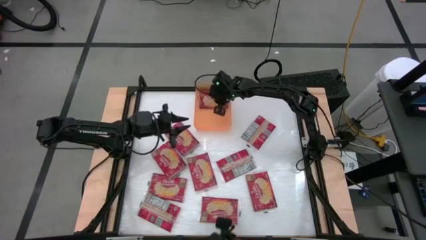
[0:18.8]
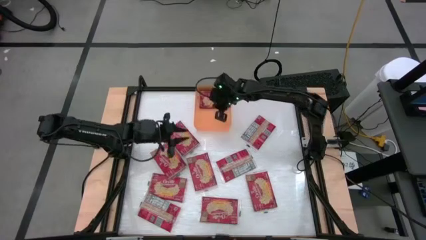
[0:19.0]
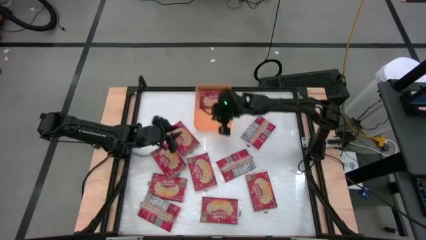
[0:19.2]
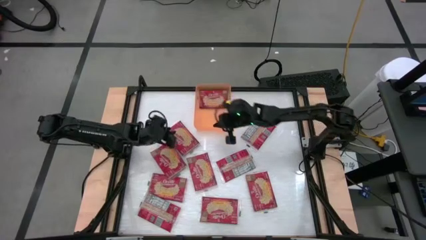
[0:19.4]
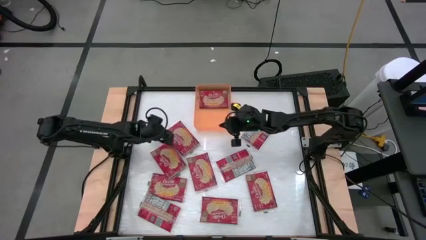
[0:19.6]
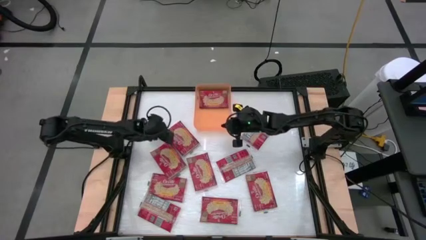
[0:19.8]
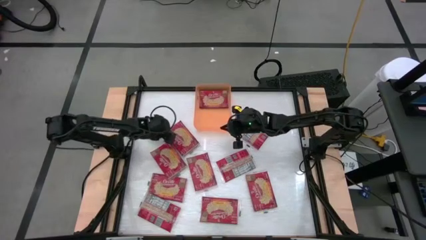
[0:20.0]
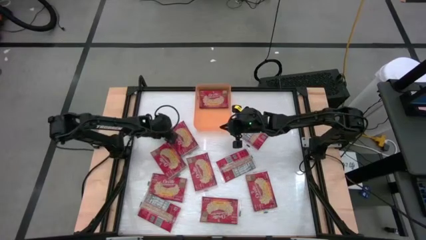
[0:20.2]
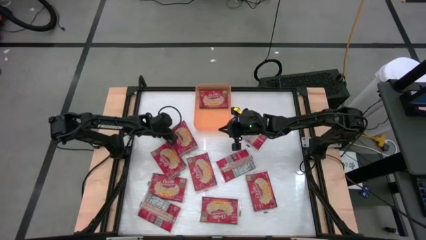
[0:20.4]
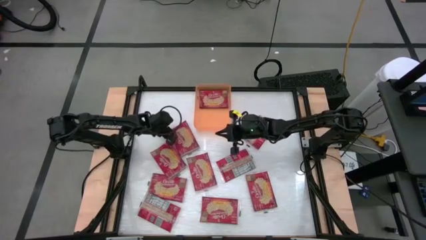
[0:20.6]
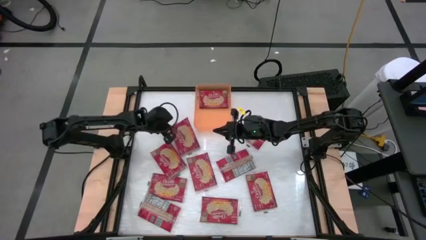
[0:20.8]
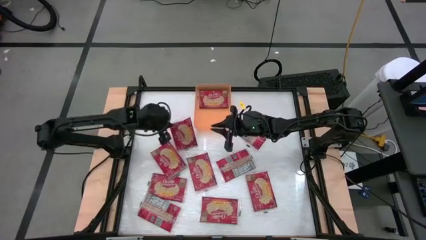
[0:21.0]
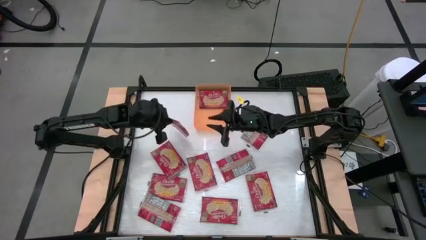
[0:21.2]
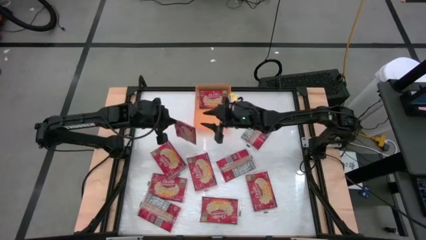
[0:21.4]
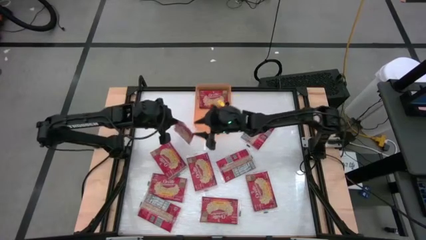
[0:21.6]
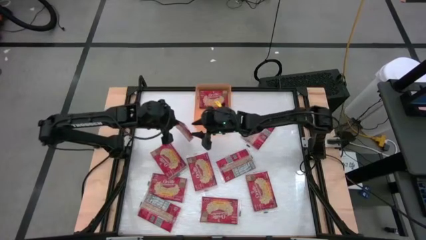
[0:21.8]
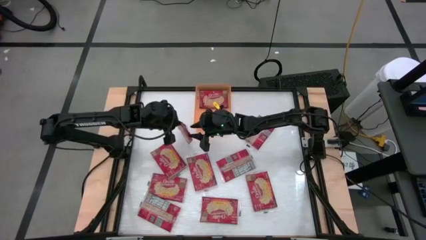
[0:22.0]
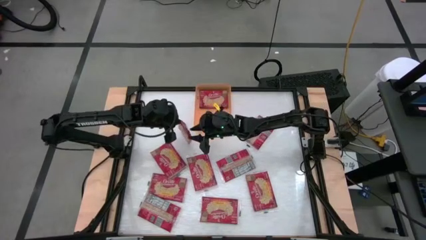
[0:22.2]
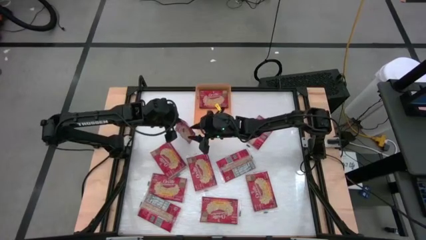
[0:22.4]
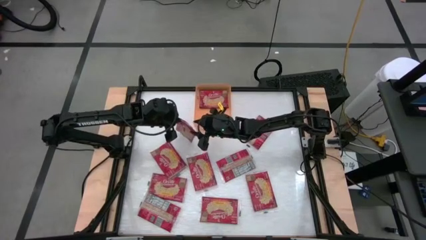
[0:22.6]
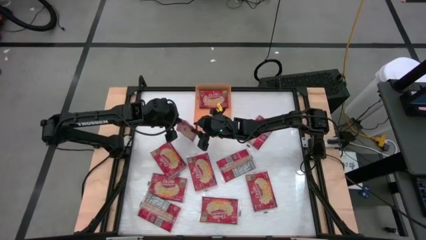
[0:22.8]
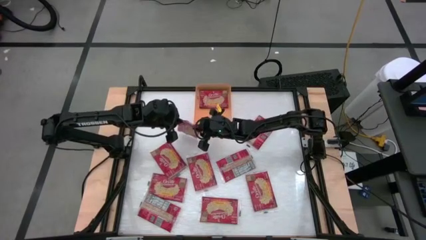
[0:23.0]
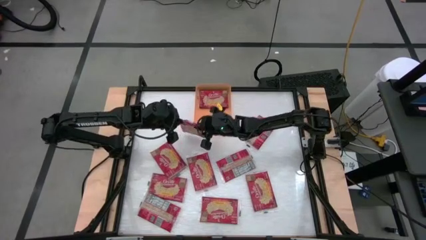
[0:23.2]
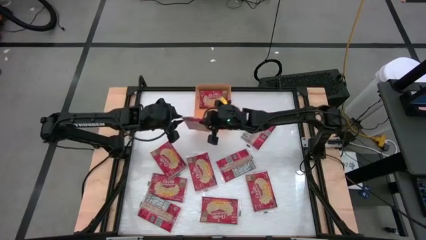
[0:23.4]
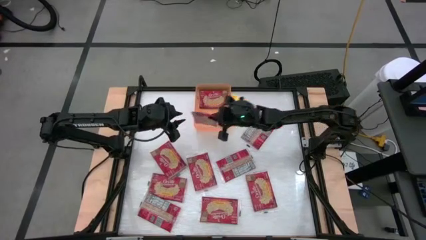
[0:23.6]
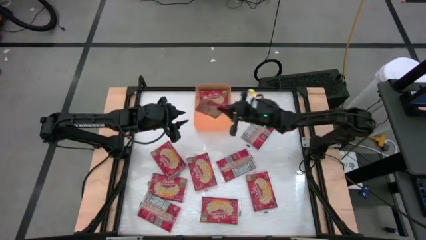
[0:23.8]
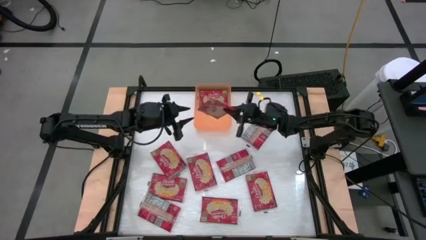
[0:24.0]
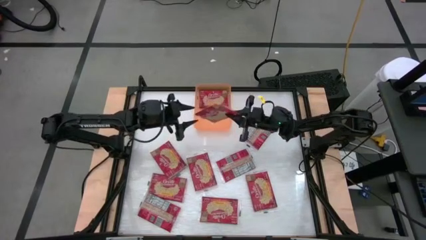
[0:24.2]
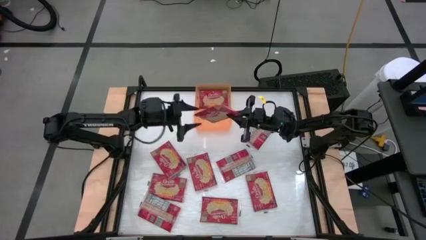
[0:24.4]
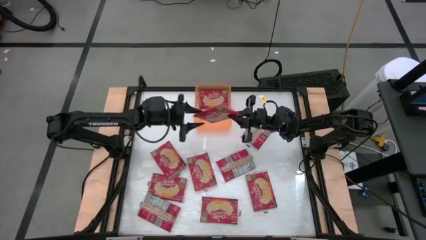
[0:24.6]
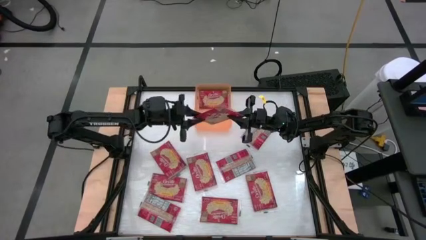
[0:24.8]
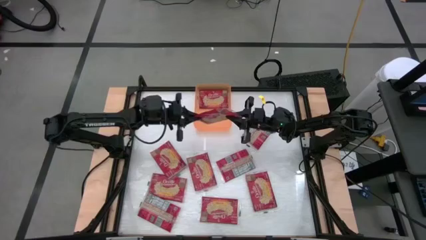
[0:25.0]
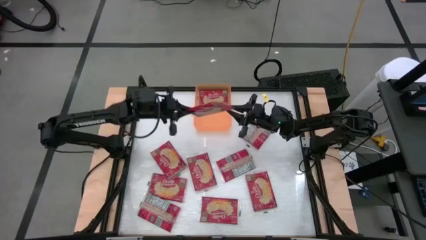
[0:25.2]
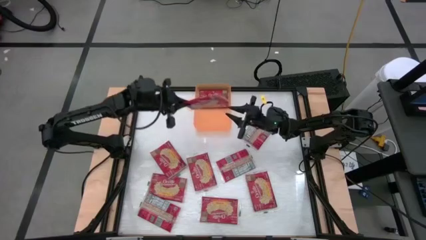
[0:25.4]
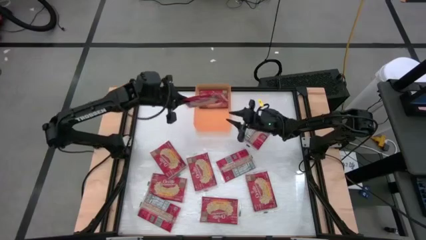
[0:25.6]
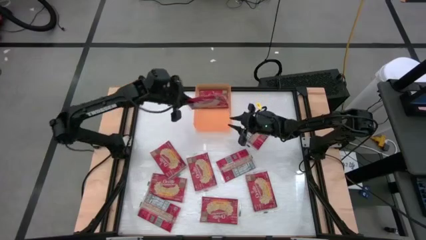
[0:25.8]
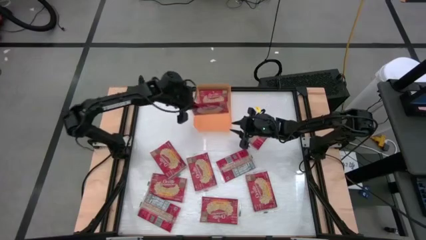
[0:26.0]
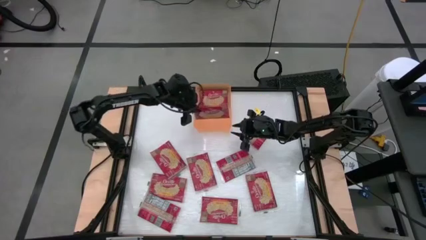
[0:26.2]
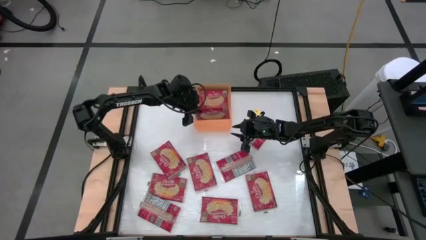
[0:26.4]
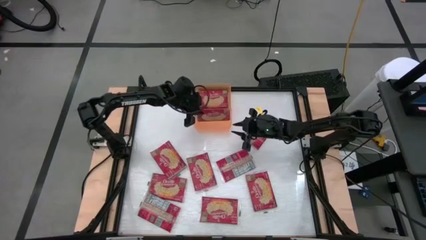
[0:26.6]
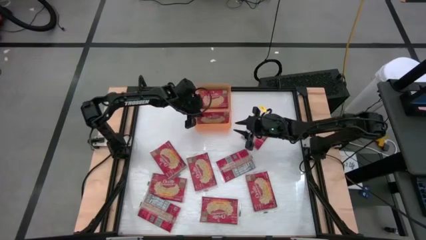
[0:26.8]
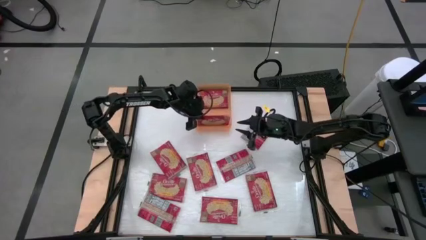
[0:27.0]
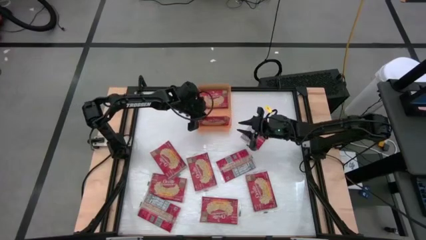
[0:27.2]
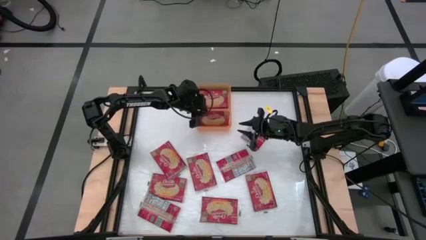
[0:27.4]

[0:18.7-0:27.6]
Task: Sort popcorn bags into baskets
Put the red popcorn bag into the orange bin

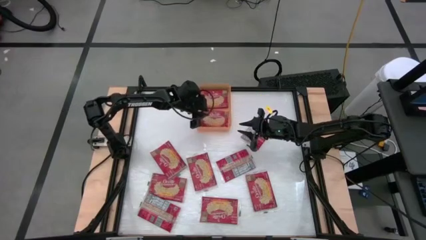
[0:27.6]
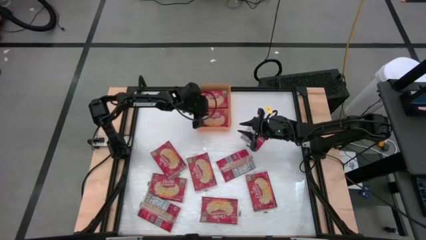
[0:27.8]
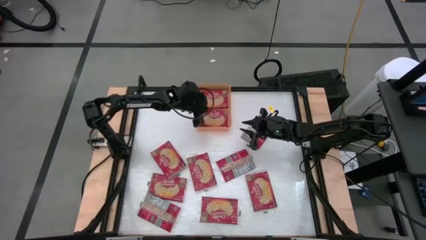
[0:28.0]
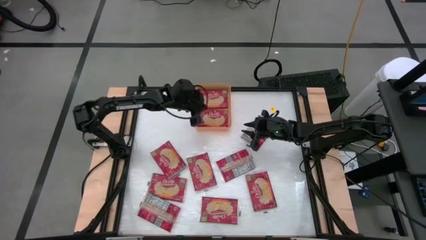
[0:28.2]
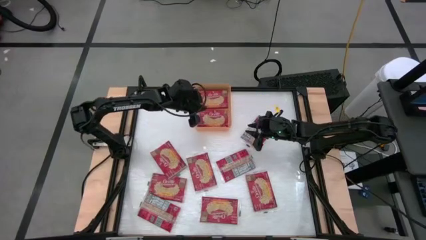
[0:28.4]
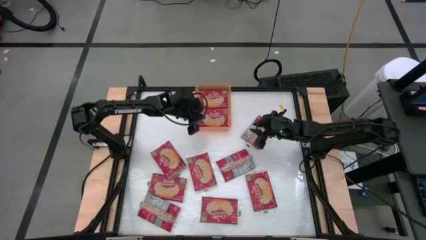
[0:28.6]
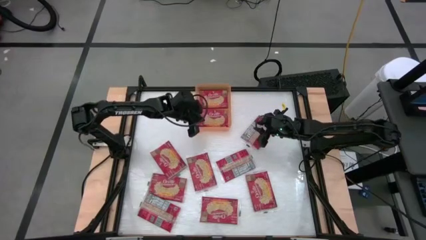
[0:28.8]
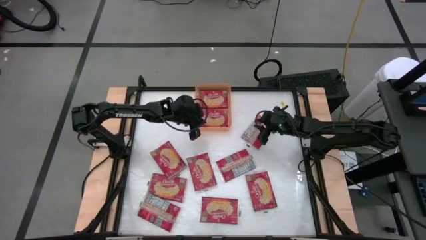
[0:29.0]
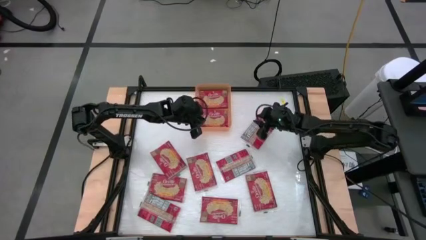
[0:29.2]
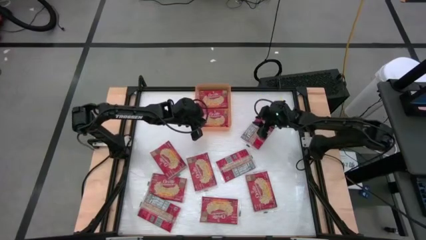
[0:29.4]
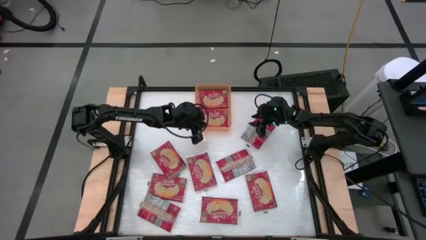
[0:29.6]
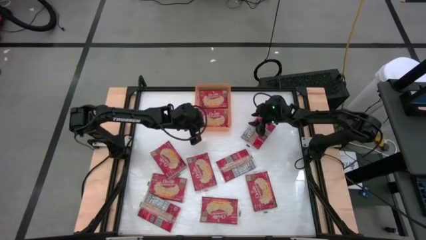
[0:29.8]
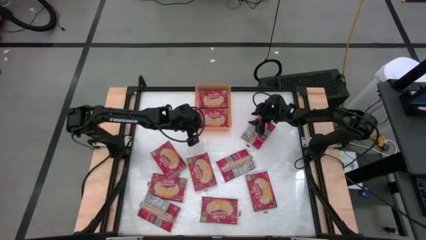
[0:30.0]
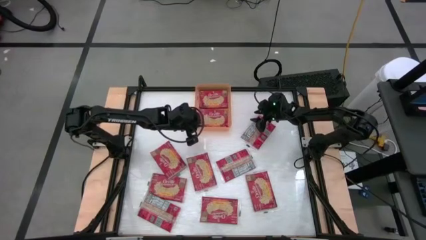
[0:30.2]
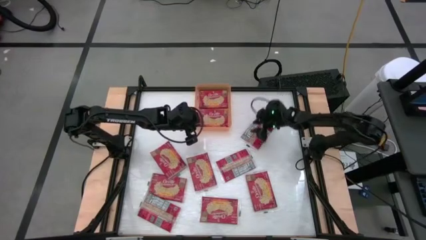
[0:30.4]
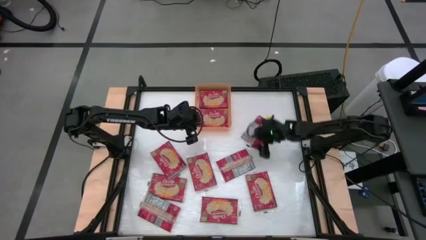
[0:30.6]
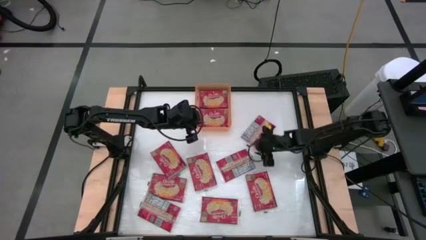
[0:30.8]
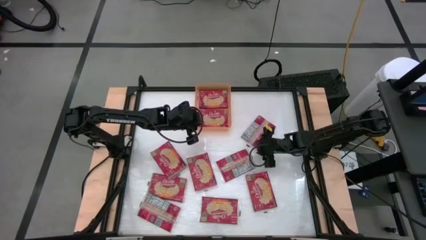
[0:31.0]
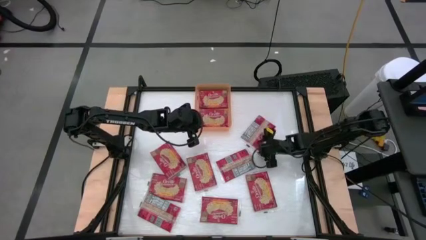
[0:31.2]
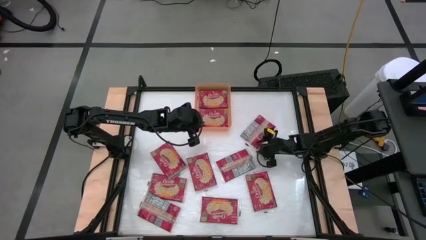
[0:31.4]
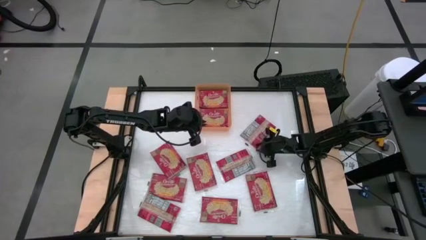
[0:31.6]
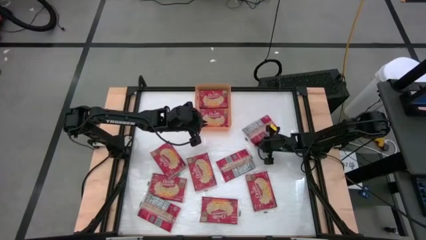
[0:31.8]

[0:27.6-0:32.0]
Put the red popcorn bag into the orange bin

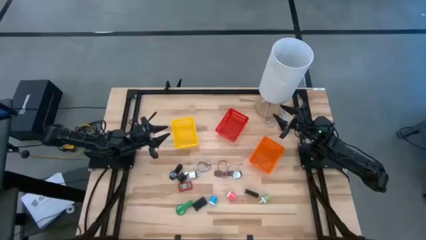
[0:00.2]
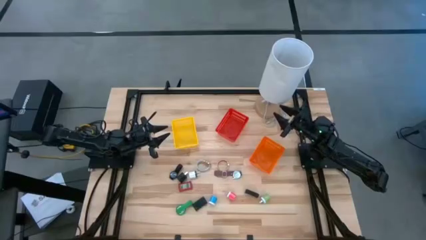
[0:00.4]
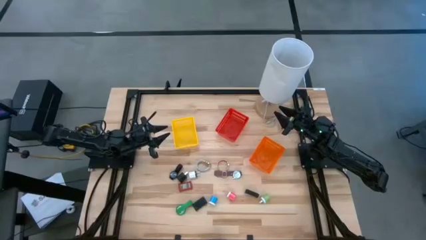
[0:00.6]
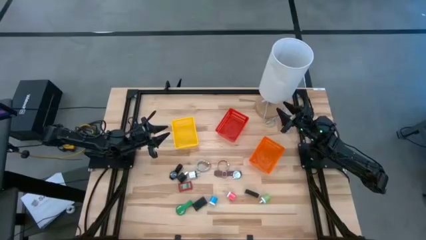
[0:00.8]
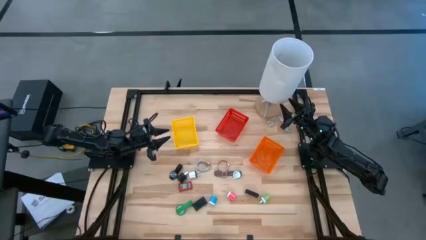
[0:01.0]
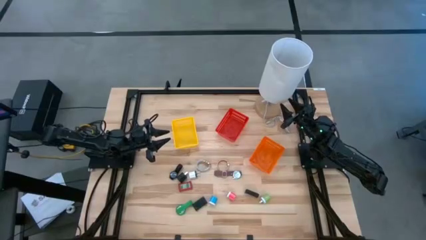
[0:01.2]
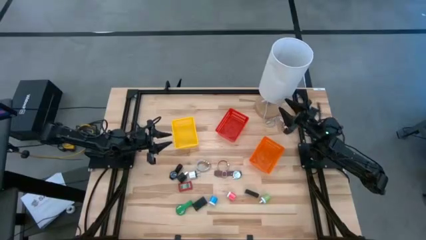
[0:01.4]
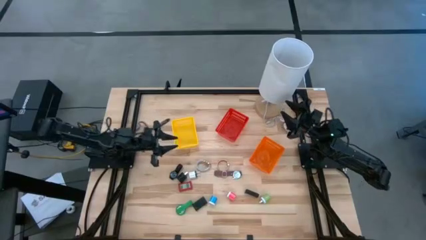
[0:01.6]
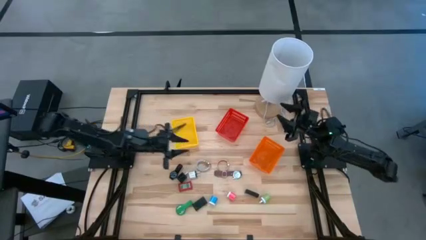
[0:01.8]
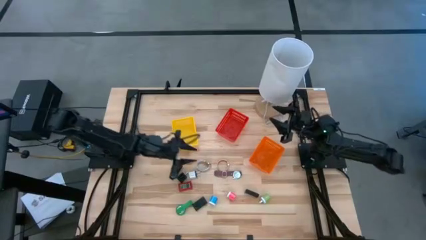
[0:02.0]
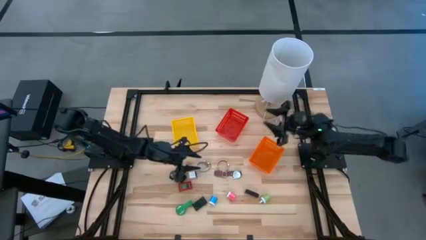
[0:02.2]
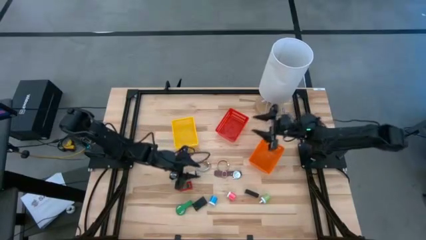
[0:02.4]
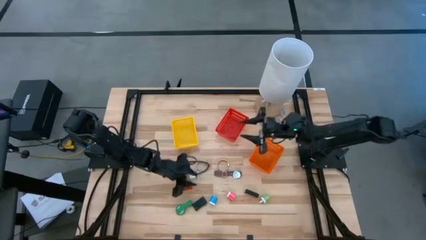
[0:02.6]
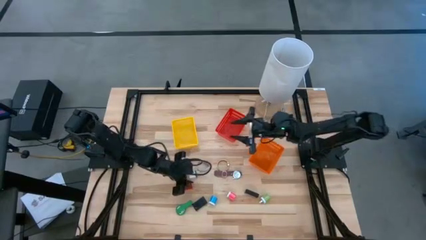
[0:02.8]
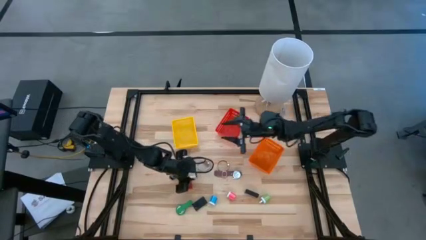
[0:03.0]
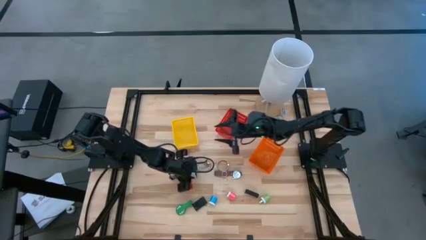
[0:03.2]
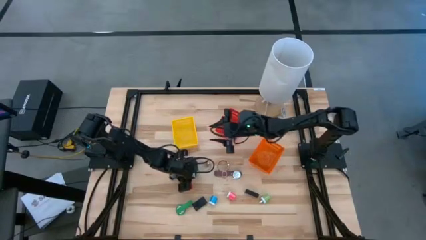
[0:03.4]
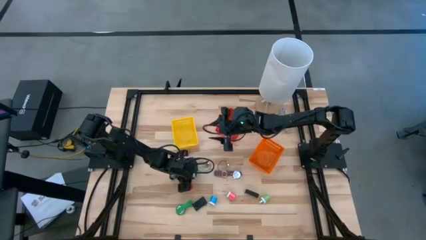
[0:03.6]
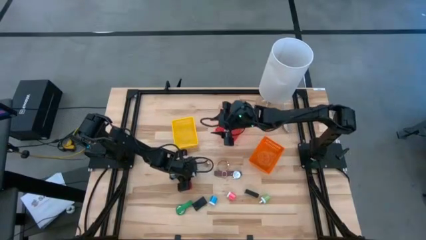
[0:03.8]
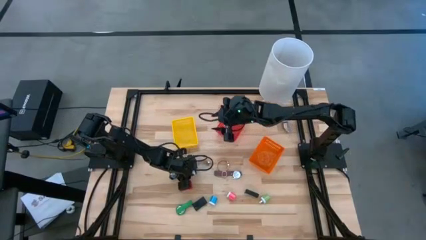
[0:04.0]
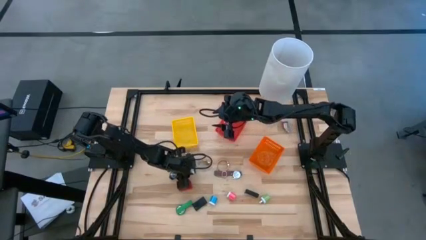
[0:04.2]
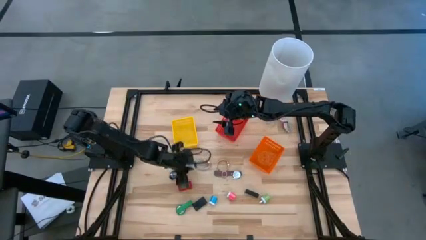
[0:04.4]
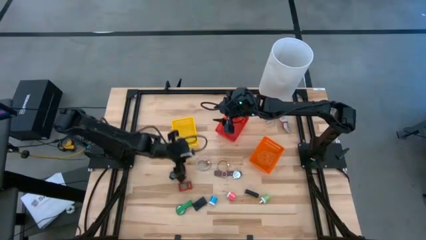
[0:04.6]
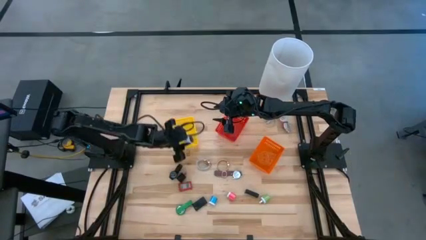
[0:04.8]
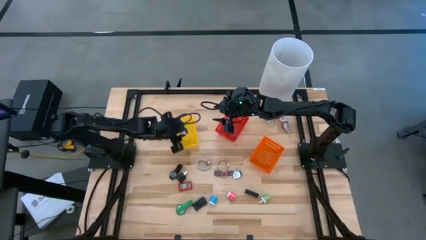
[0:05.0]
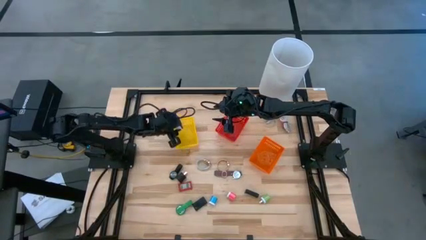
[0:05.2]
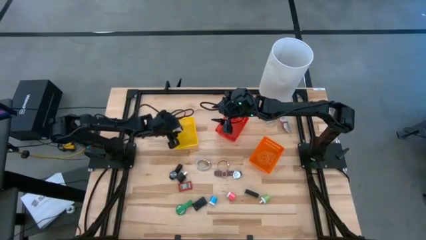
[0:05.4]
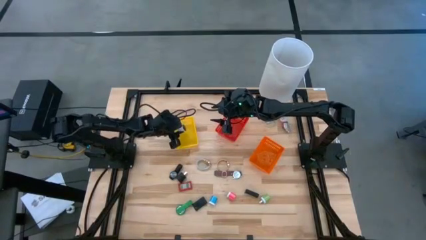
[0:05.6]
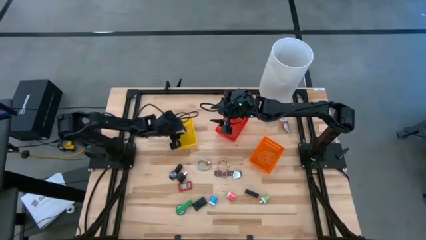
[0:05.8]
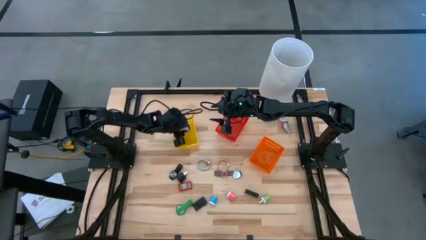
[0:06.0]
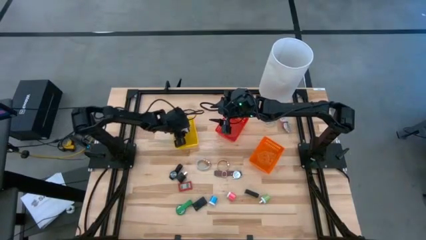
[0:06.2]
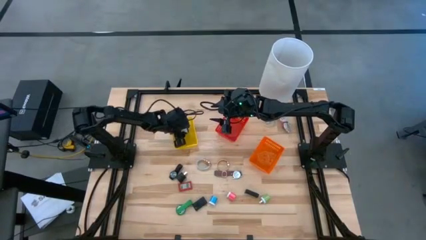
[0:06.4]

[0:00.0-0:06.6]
Task: Pick & Place Office items
Put the white adapter into the yellow basket
